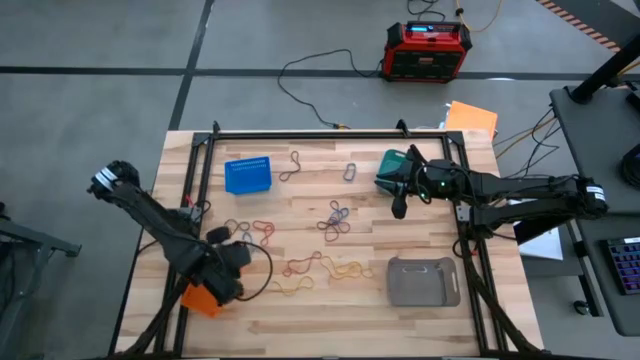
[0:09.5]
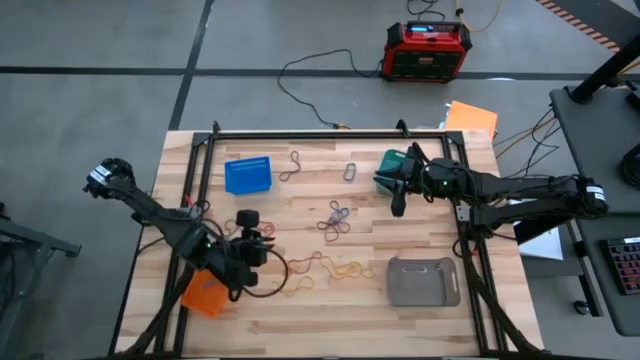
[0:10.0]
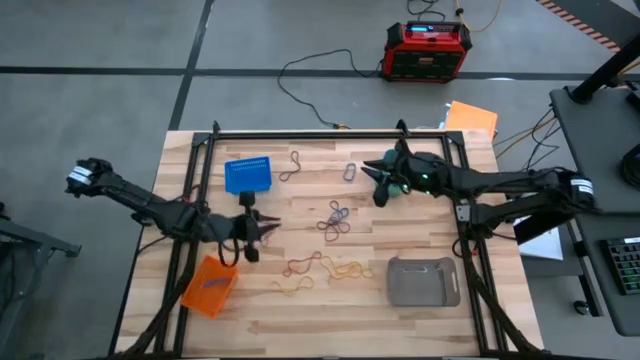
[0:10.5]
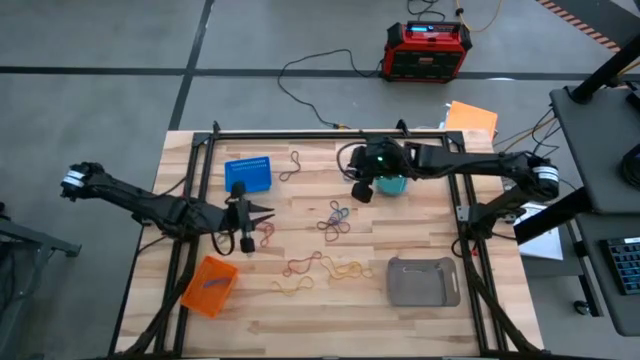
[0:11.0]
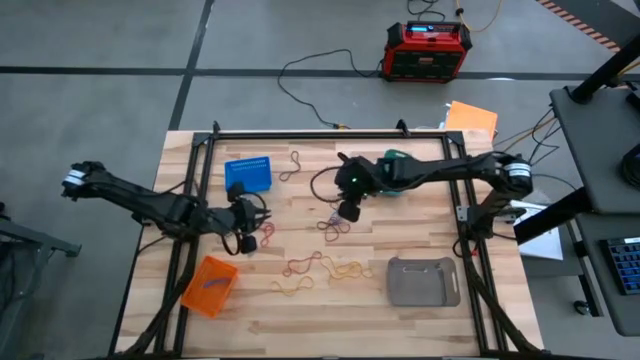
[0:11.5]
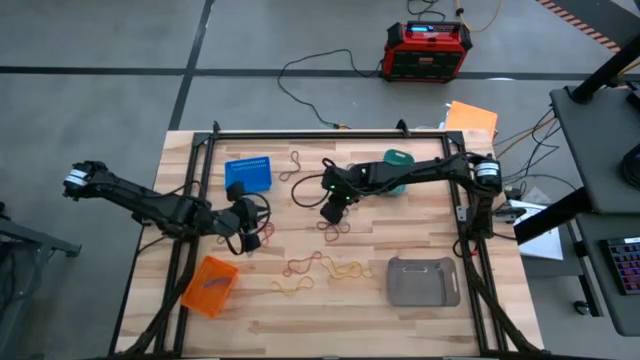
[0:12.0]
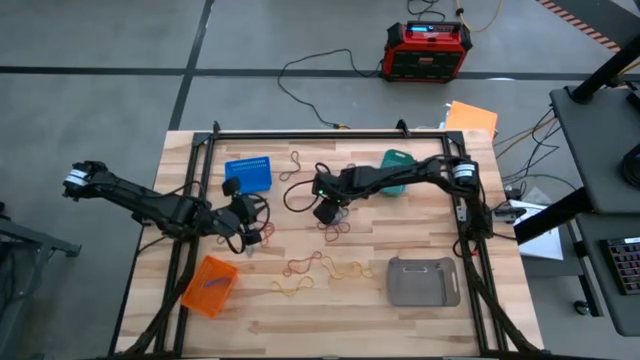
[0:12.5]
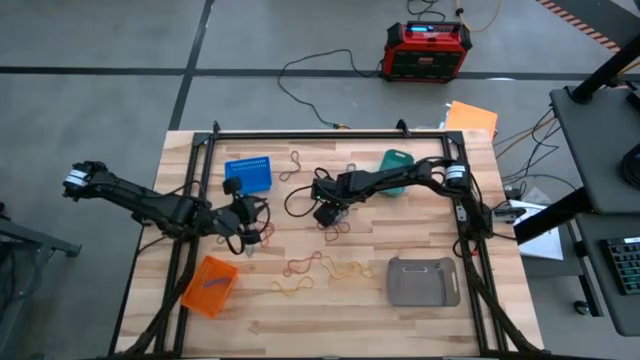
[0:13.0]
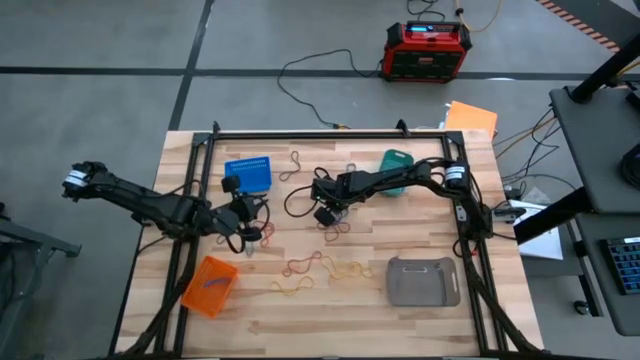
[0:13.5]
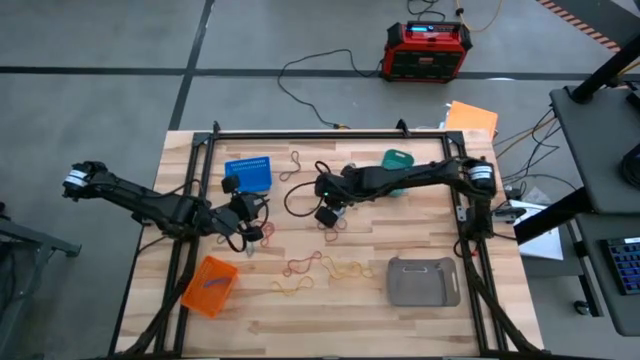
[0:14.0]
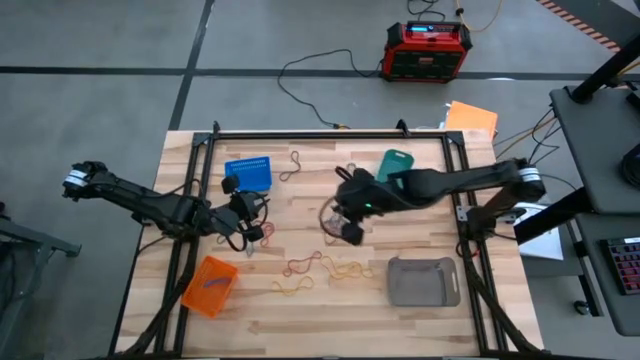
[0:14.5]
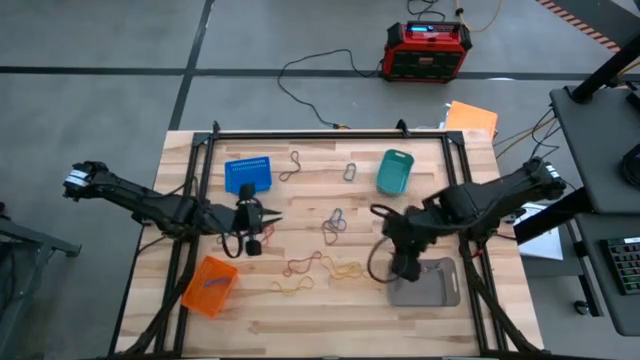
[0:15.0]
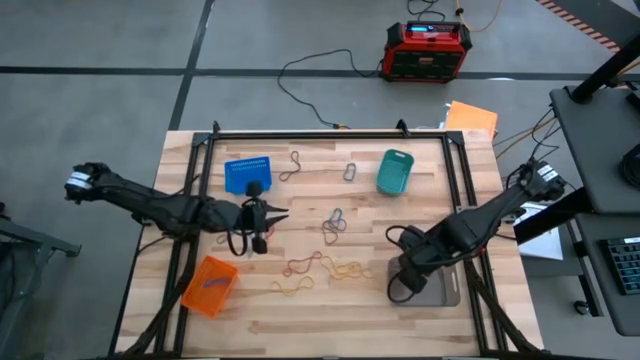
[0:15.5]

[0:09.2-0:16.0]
Task: Sort rubber bands into baskets
Put the bottom right violet rubber band into the black bin

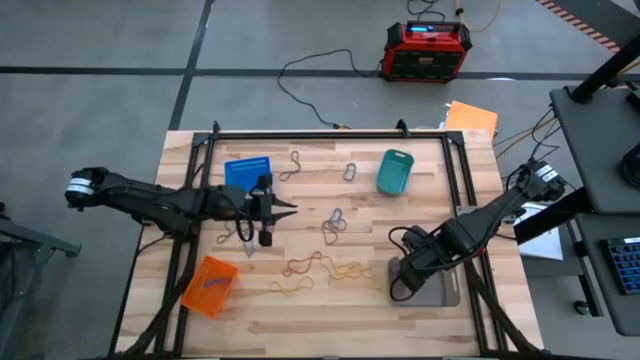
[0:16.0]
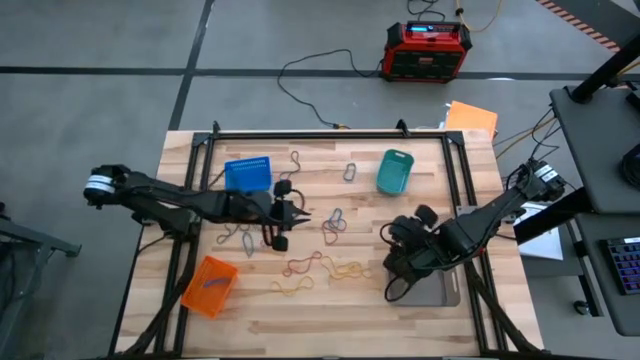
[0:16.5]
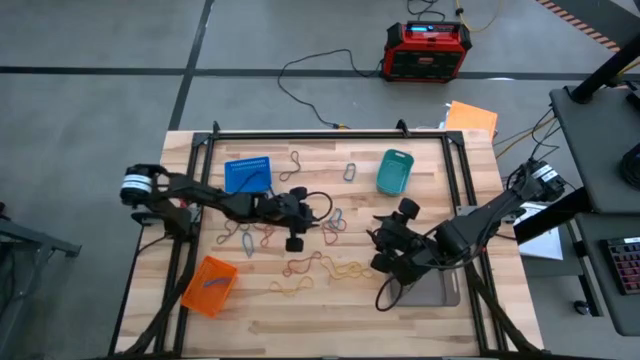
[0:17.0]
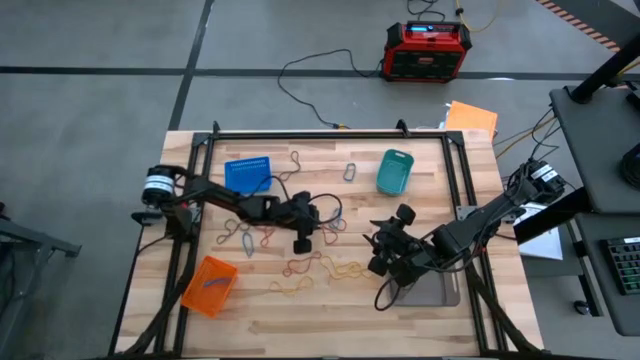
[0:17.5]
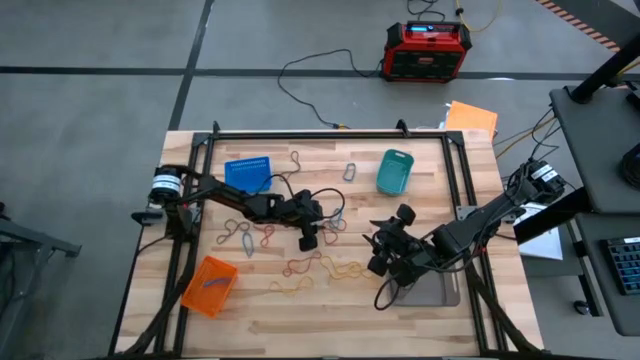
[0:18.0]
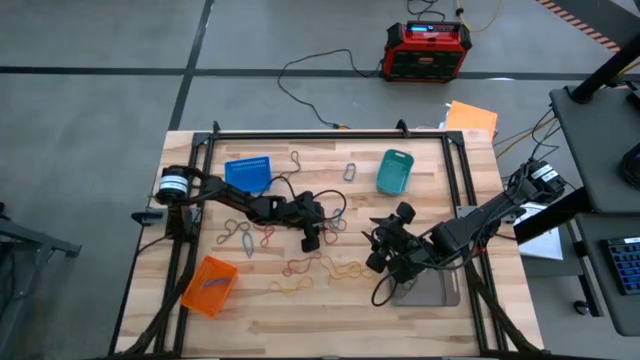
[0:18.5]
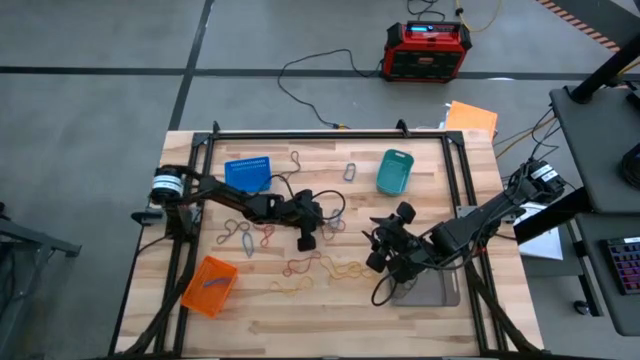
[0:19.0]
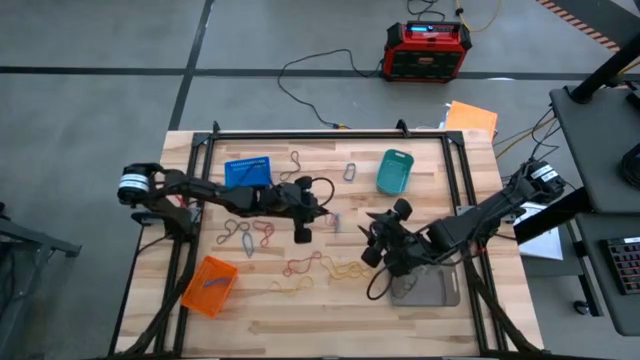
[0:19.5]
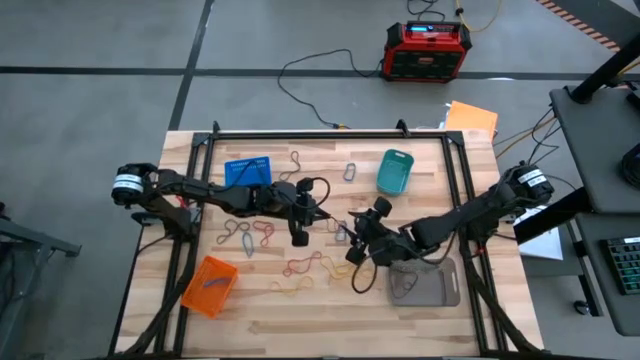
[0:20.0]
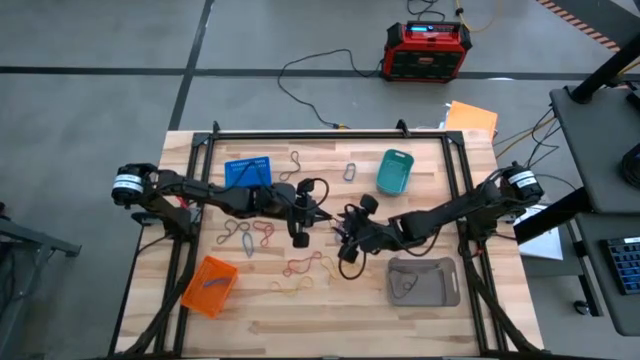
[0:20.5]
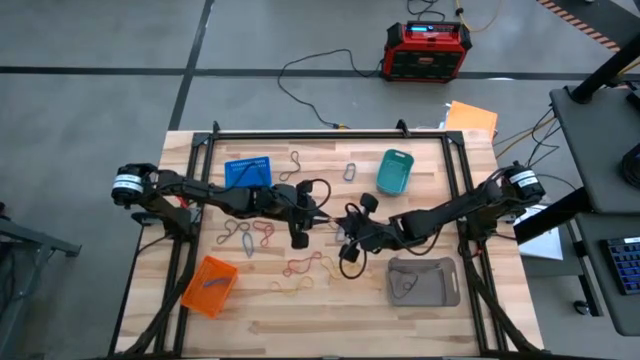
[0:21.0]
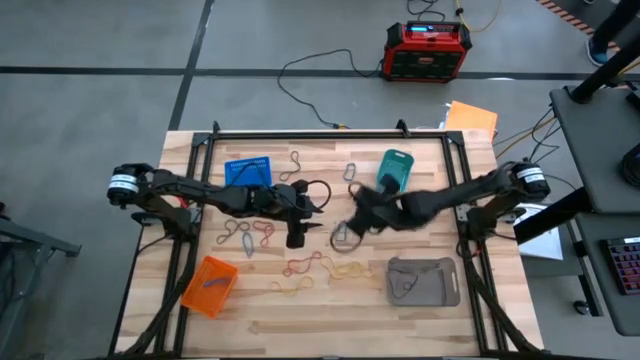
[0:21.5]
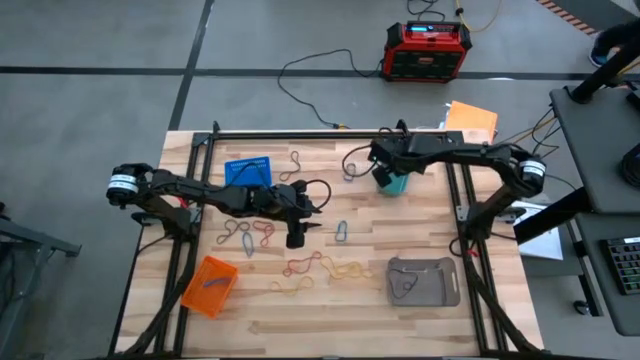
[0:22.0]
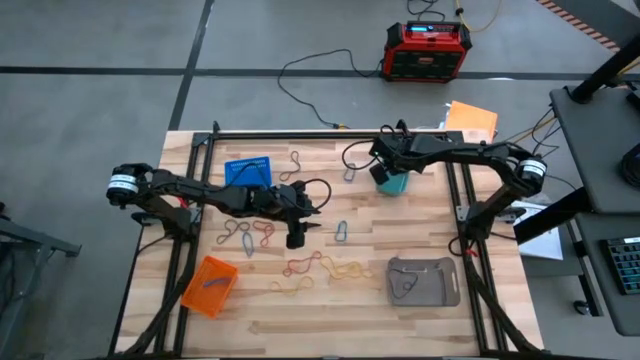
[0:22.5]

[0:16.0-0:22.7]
Put the top right orange rubber band into the right blue bin

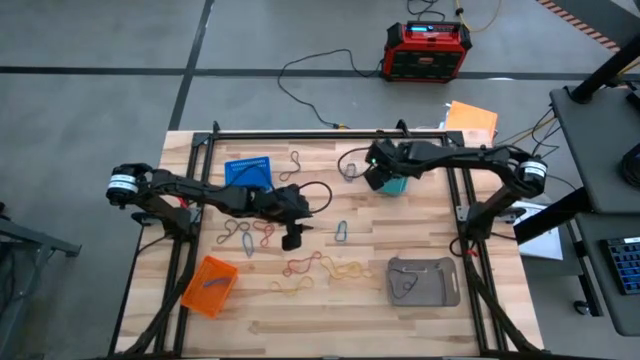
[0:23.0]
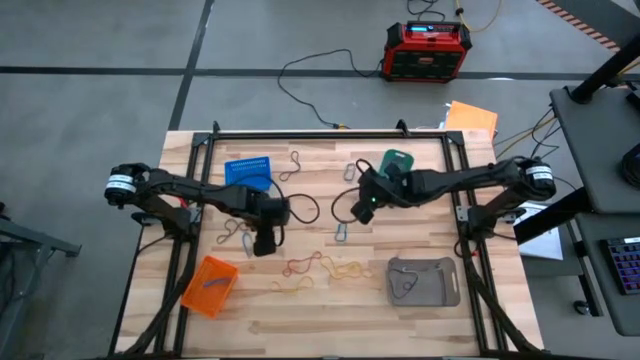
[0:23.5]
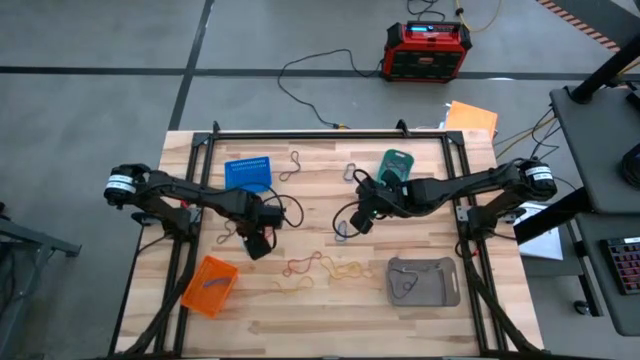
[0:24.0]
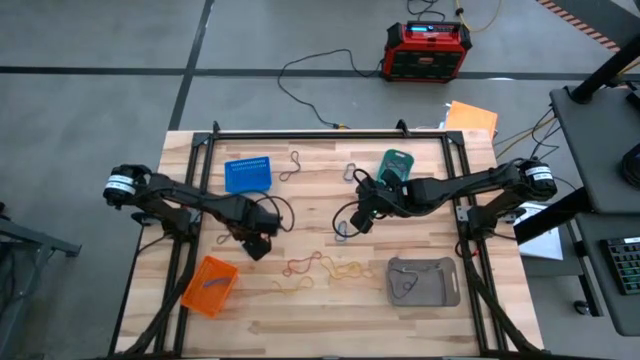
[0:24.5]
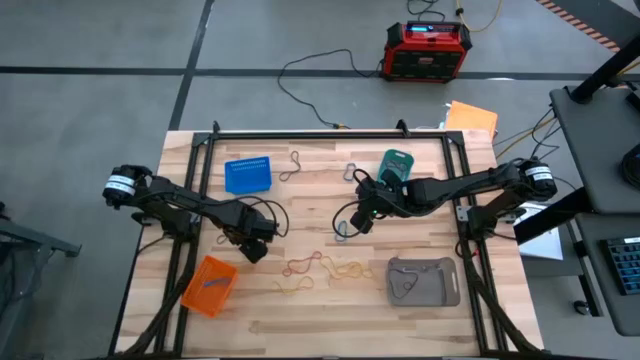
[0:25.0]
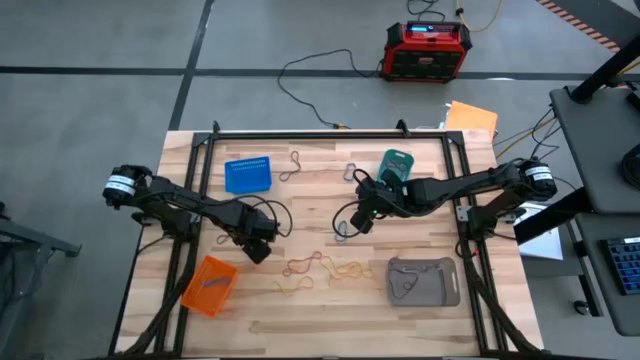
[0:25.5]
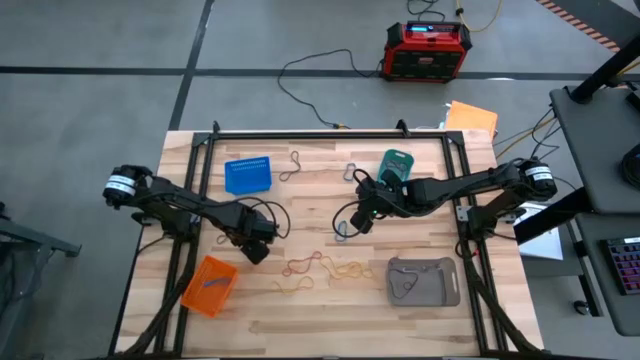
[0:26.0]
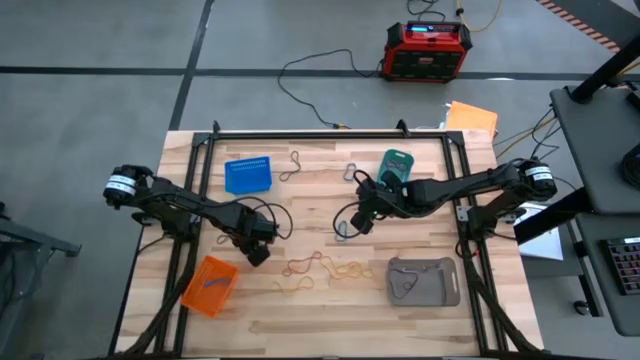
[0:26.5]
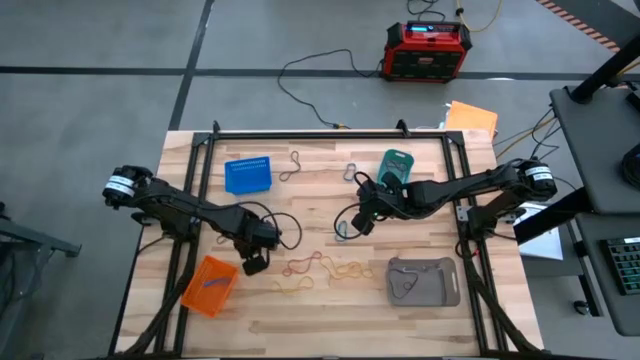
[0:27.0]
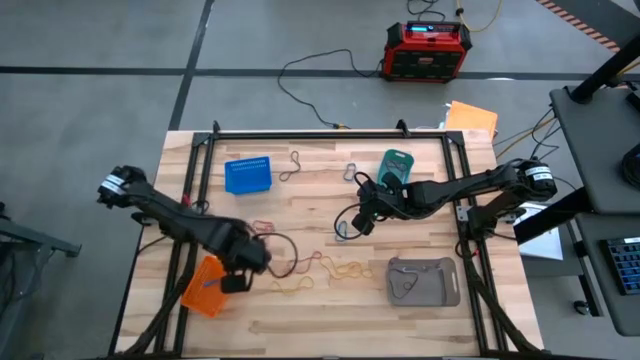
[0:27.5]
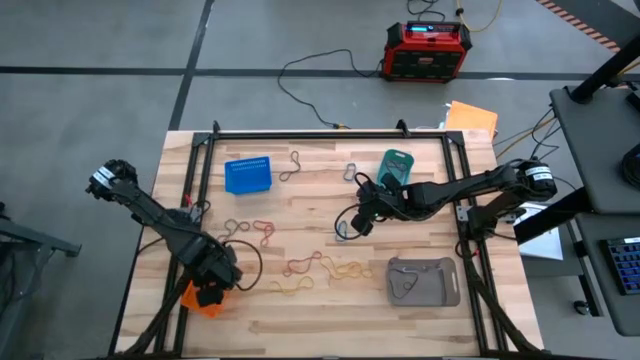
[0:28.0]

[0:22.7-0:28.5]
Put the bottom left blue rubber band into the orange bin

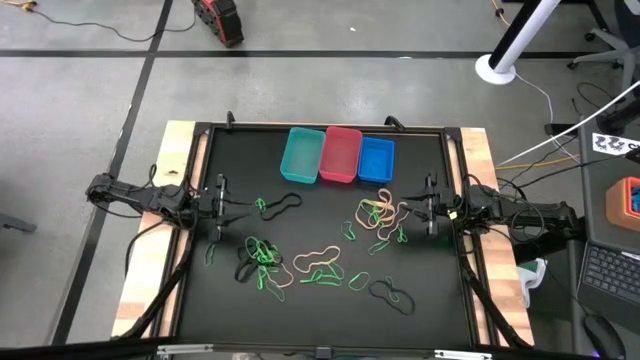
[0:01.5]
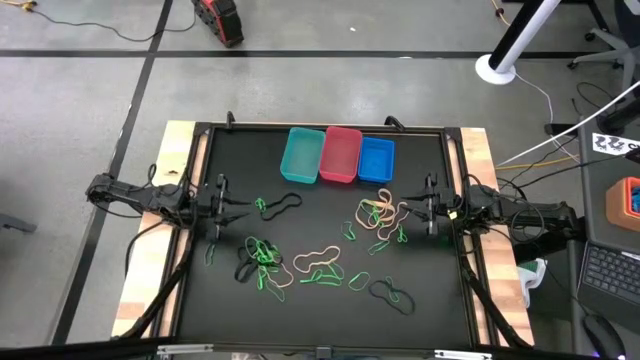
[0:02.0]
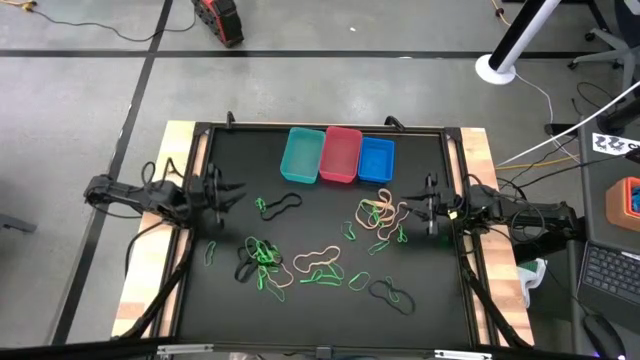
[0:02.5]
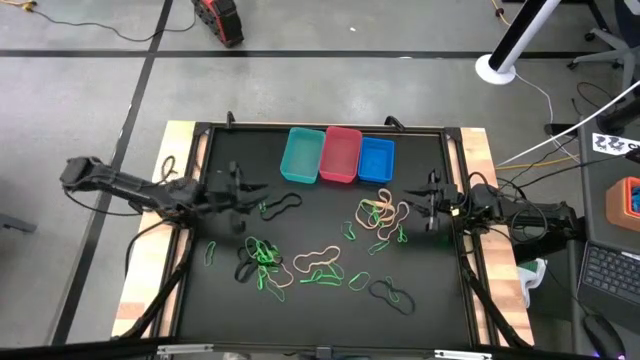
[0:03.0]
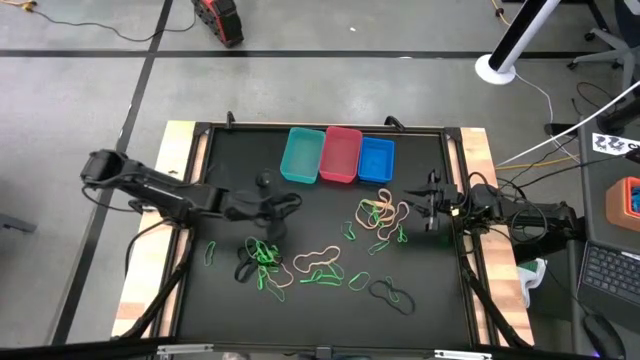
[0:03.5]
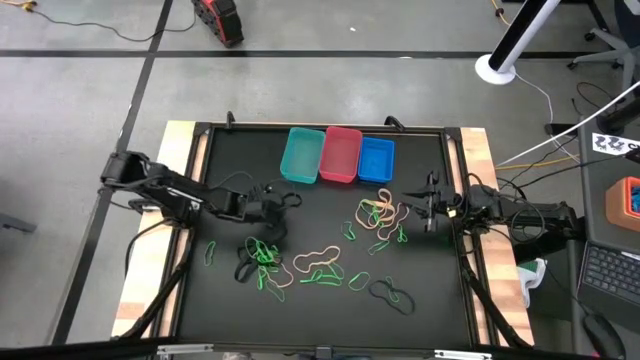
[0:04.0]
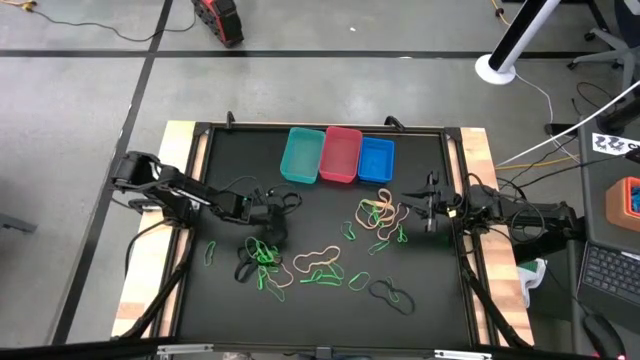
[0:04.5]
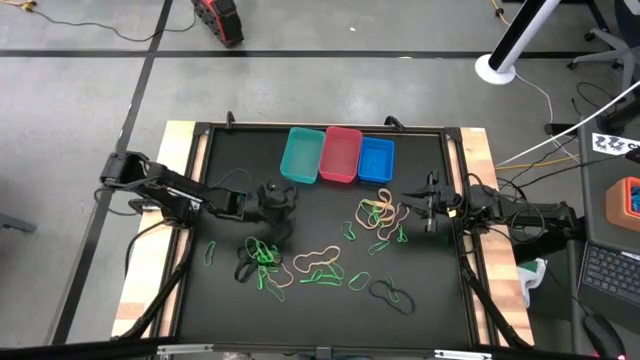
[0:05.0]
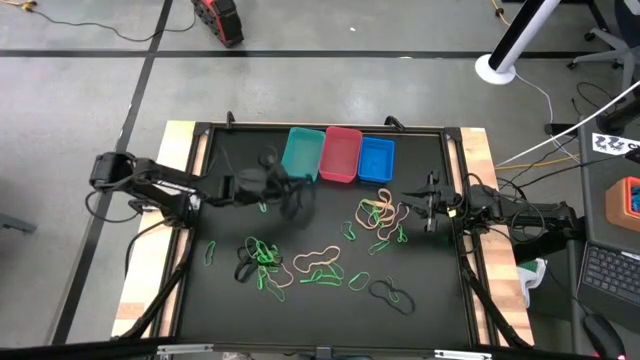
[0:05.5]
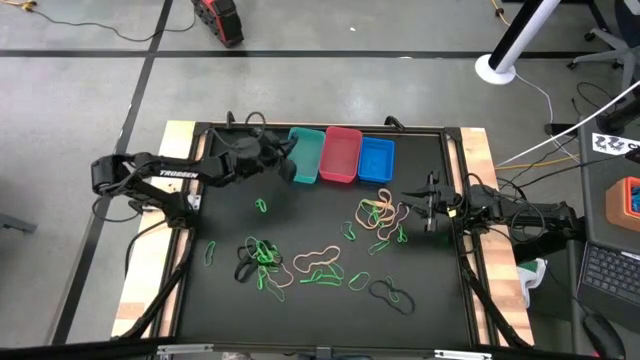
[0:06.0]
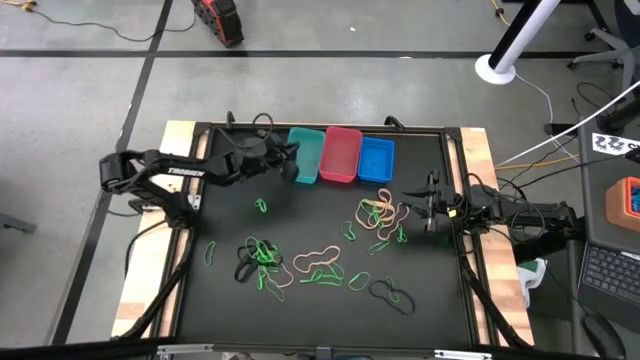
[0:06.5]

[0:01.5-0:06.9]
Task: Sort rubber bands into baskets
Put the black rubber band into the light blue bin
